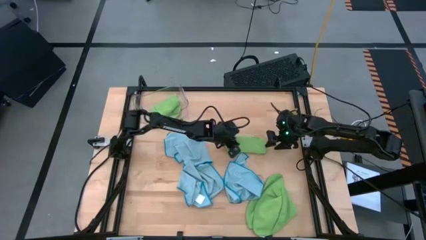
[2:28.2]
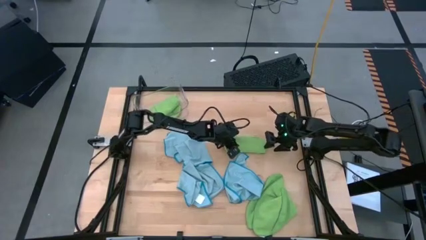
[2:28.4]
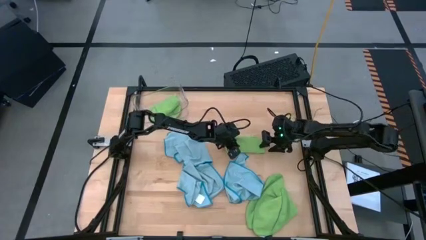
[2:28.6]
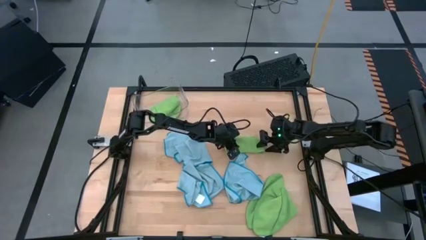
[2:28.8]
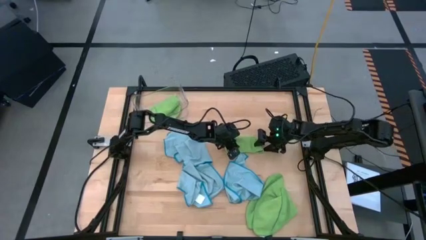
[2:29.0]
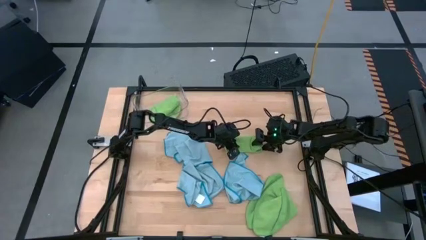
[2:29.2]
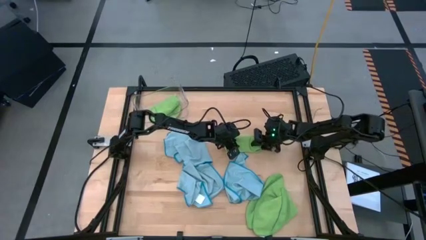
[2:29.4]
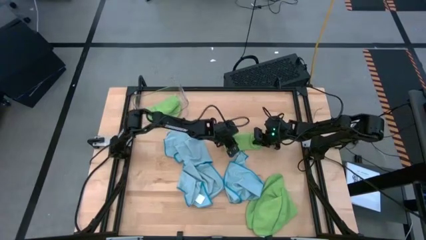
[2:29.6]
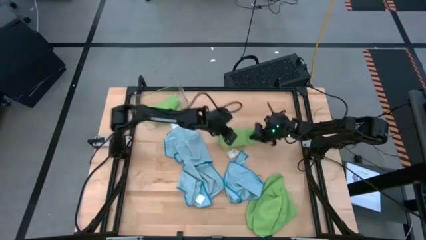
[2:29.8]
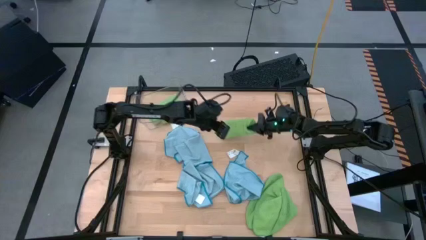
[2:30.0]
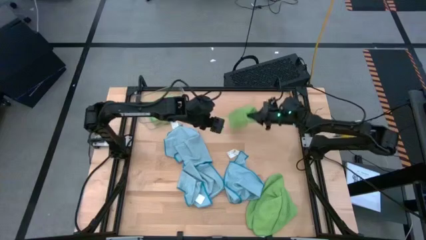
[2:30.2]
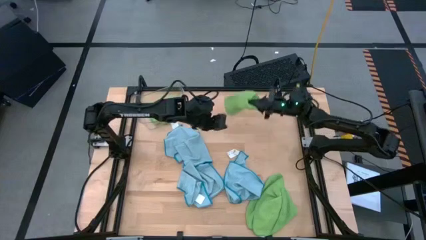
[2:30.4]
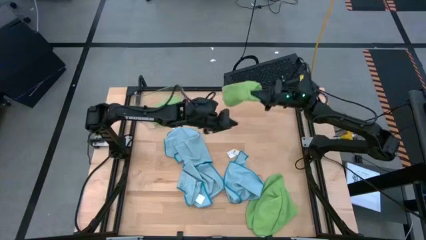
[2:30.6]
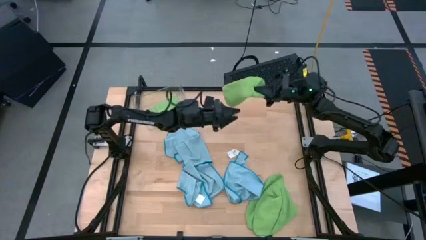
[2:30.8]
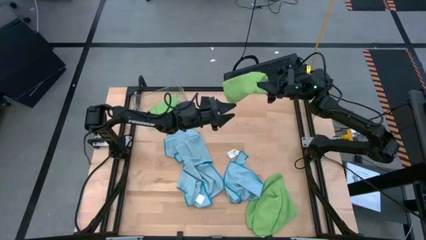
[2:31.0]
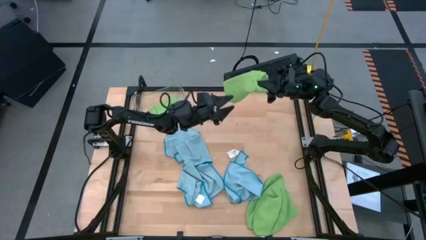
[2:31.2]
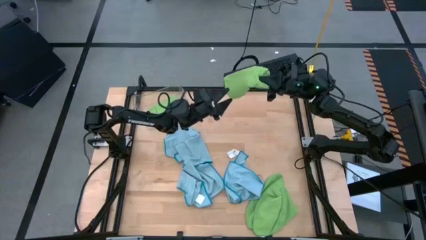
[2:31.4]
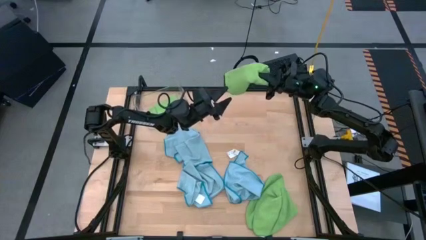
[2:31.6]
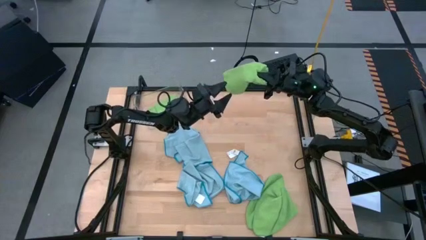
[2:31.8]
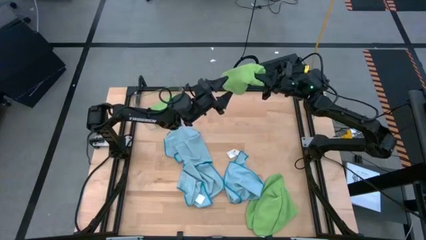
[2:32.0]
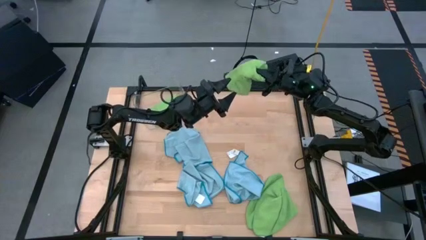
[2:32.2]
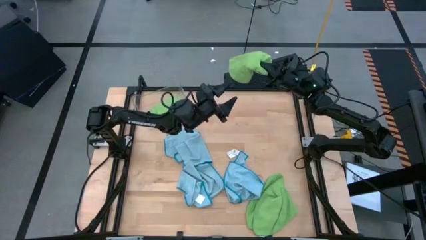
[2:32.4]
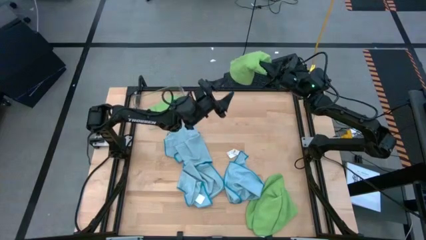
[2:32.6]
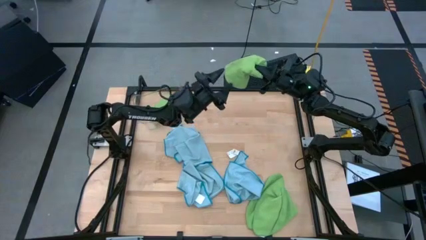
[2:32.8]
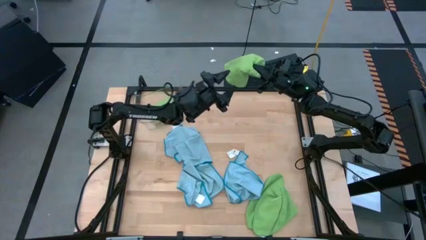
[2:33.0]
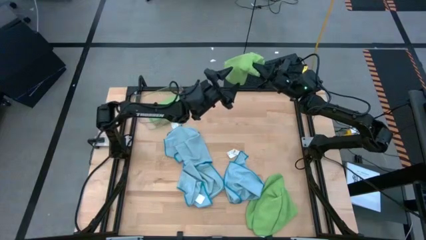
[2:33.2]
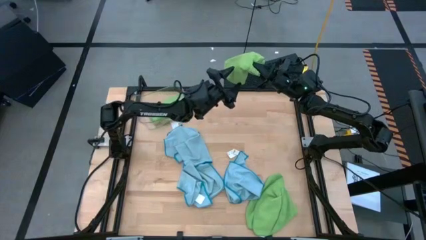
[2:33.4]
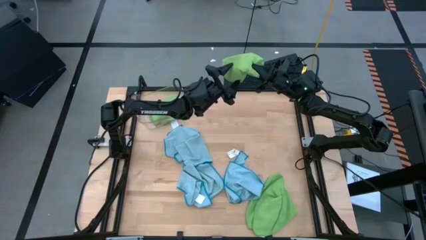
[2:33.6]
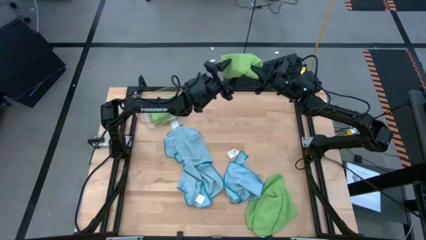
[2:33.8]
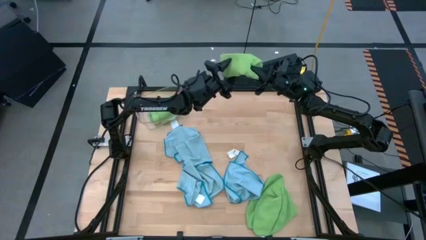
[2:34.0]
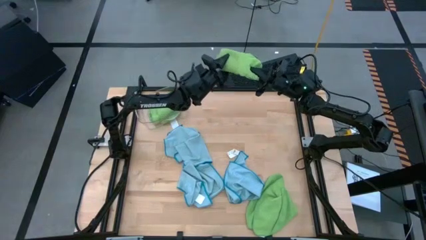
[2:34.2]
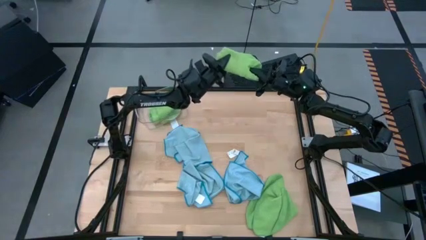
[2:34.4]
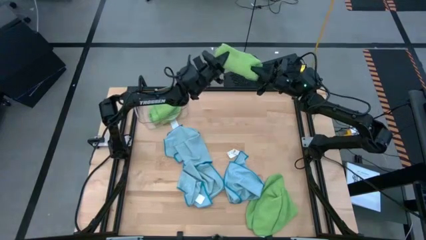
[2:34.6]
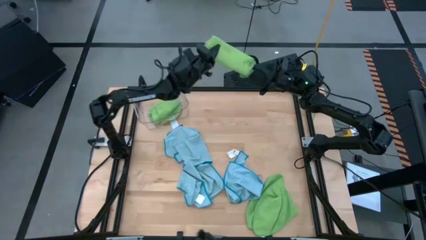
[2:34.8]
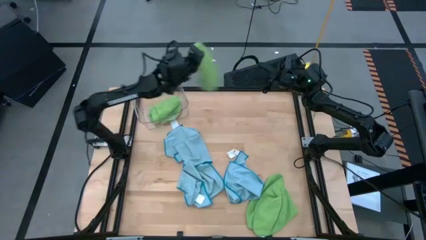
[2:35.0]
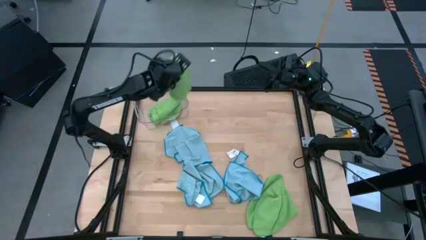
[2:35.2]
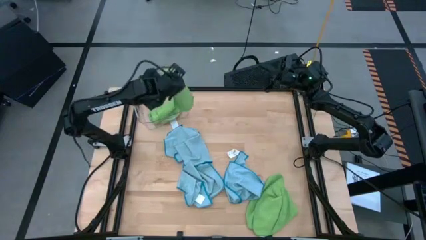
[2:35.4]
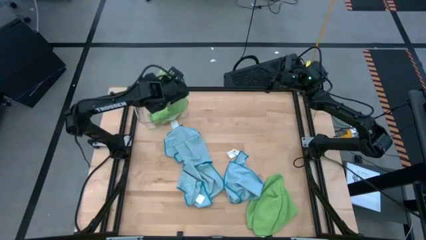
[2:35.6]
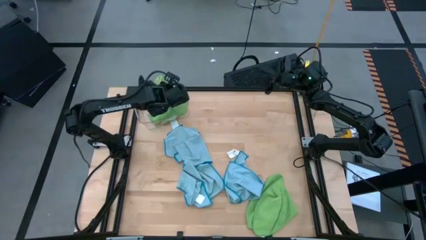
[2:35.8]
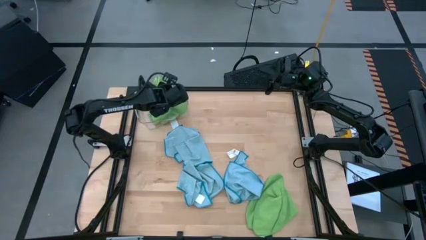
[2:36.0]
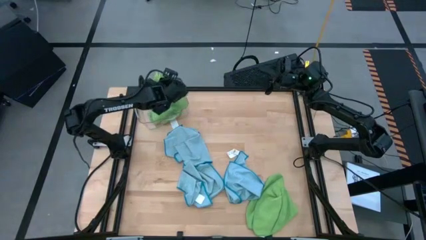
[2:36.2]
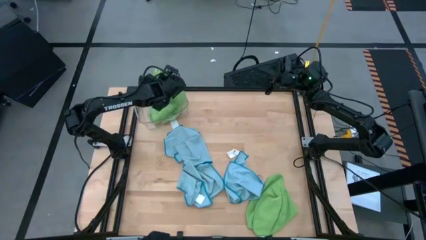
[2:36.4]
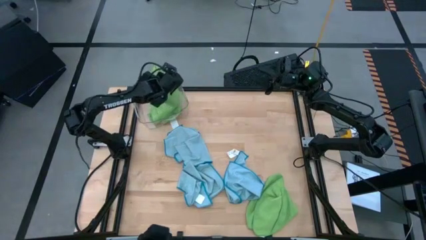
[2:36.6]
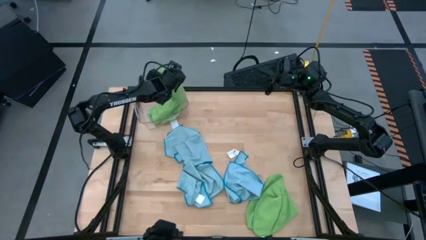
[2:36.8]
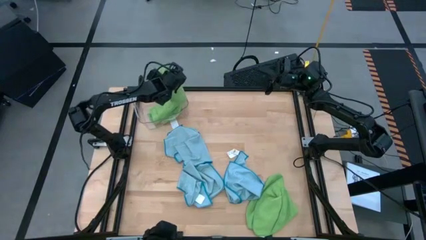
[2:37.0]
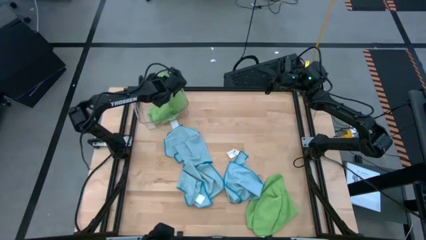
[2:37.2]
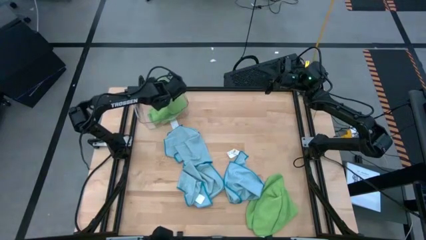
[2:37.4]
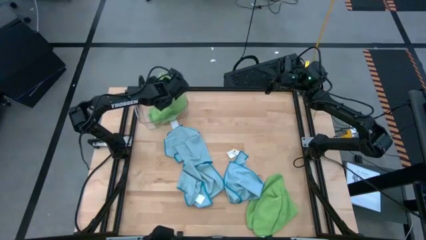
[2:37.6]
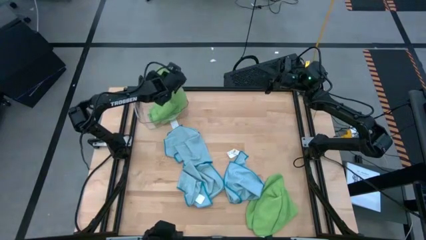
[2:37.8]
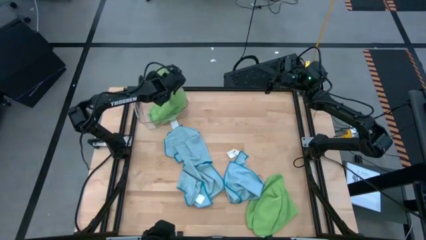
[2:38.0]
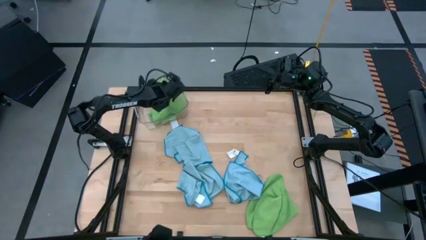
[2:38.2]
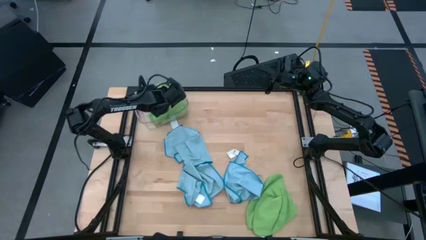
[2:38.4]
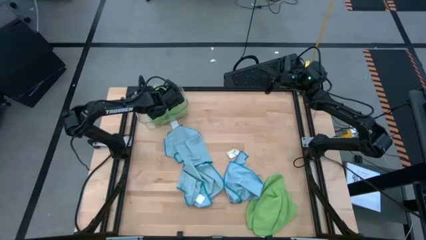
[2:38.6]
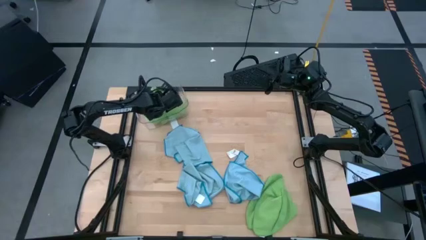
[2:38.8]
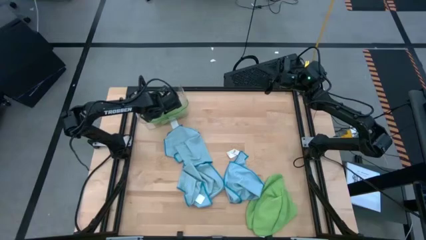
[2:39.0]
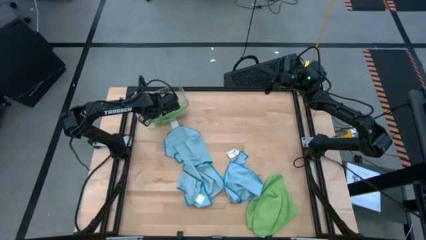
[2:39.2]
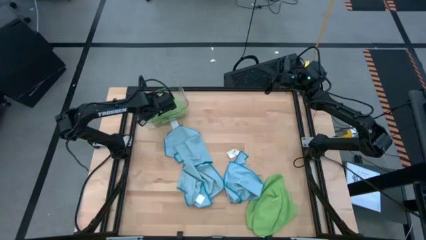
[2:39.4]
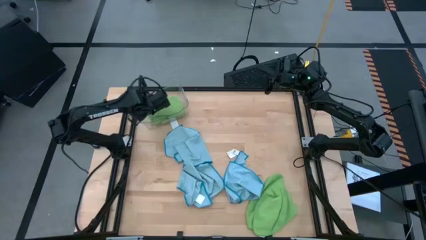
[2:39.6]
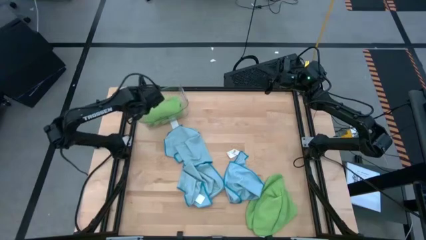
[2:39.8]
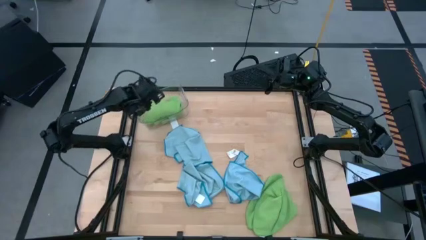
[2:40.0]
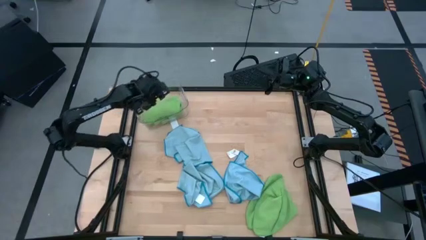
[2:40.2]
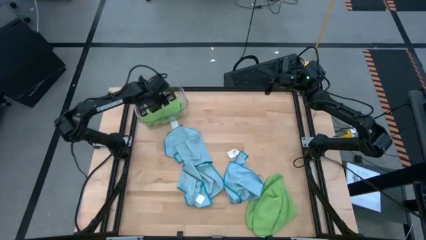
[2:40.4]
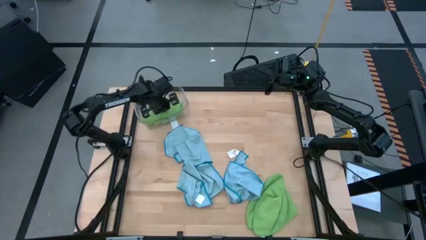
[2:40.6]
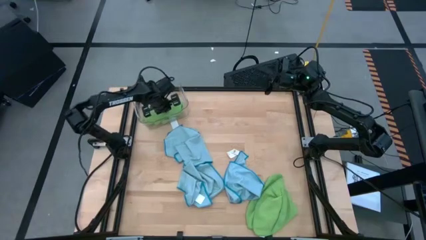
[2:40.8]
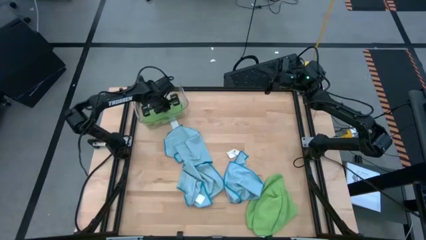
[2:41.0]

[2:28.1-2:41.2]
Task: Fold microfiber towels
Stack the folded green microfiber cloth on top of the green microfiber cloth on the transparent bin

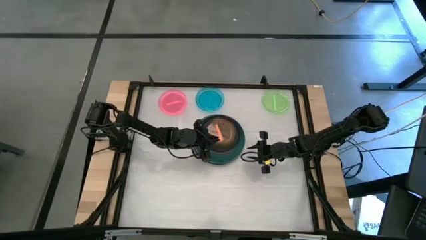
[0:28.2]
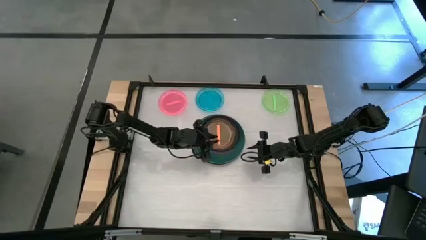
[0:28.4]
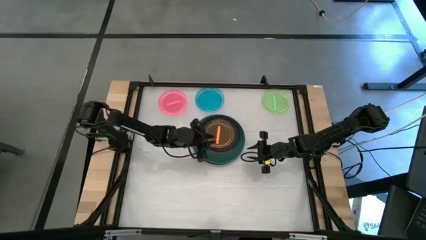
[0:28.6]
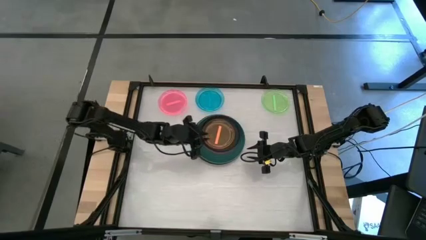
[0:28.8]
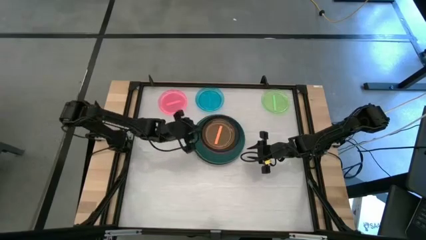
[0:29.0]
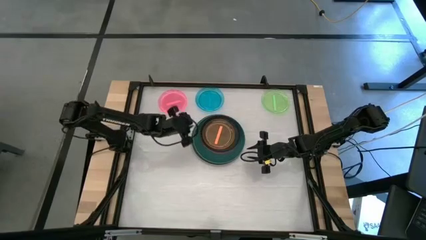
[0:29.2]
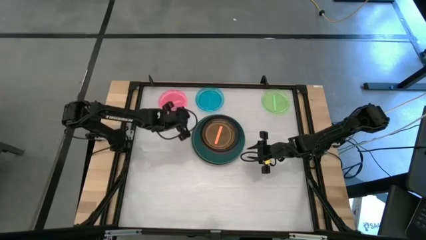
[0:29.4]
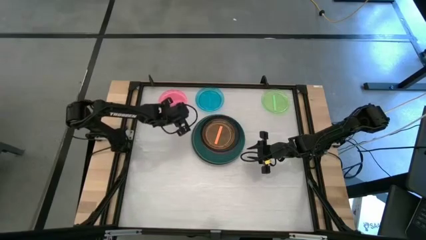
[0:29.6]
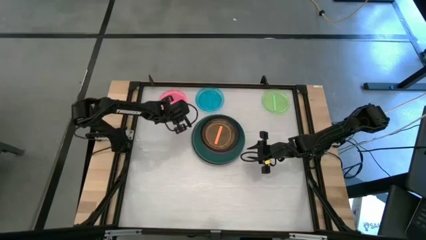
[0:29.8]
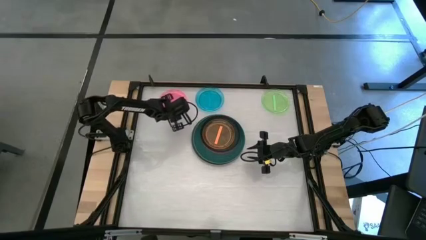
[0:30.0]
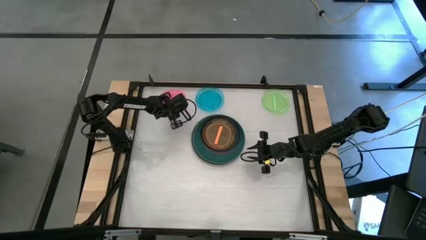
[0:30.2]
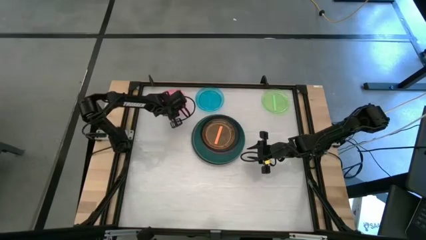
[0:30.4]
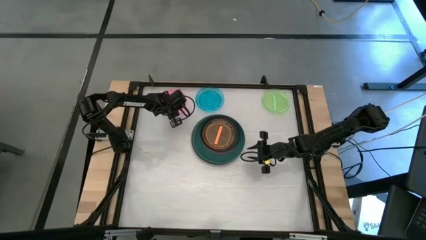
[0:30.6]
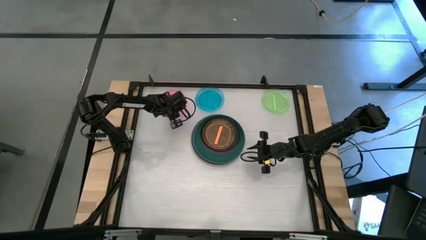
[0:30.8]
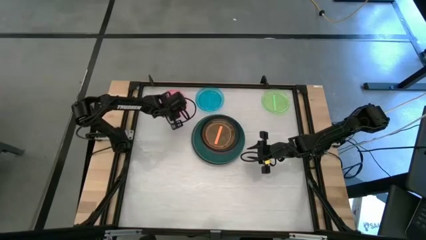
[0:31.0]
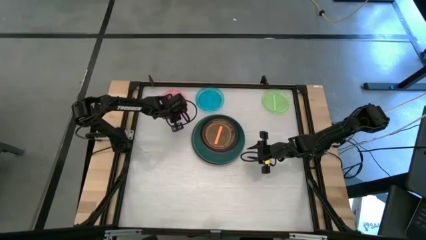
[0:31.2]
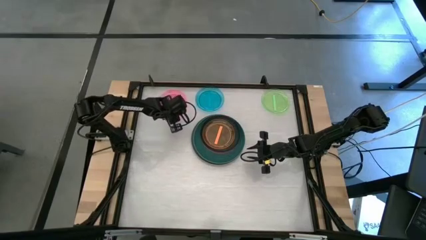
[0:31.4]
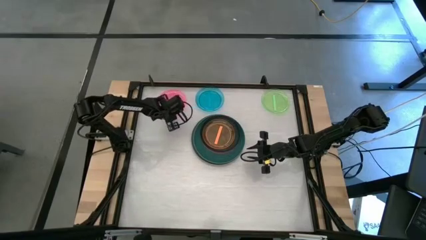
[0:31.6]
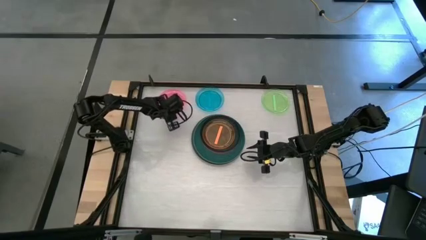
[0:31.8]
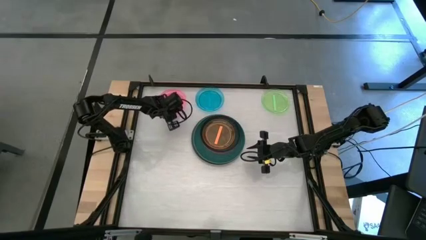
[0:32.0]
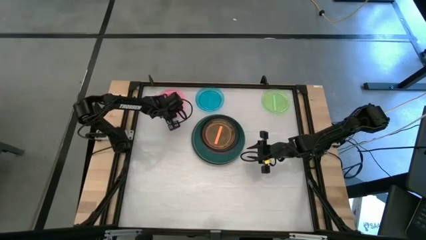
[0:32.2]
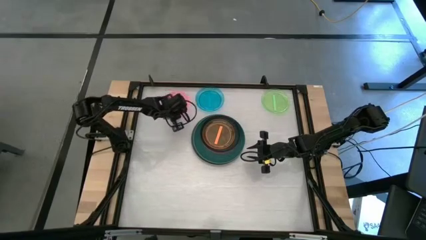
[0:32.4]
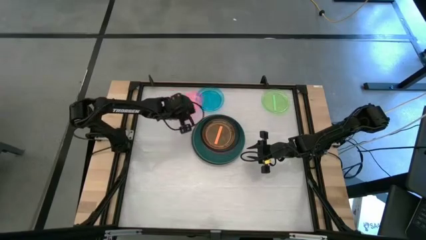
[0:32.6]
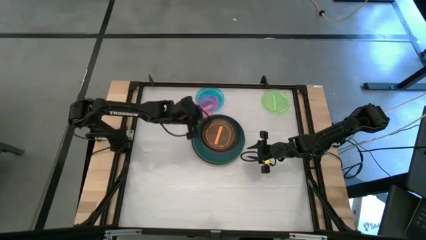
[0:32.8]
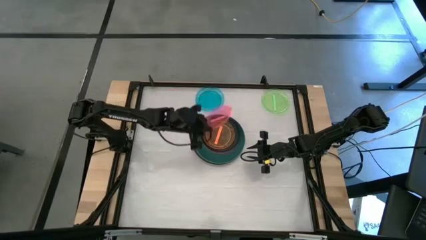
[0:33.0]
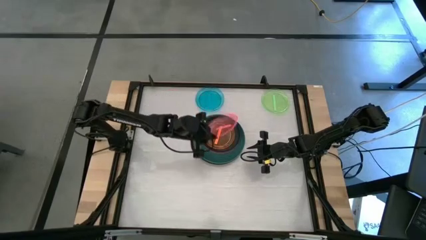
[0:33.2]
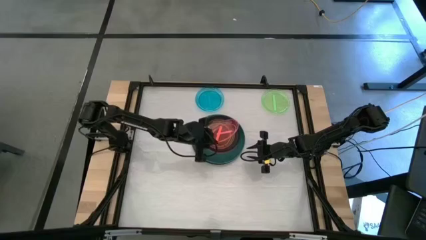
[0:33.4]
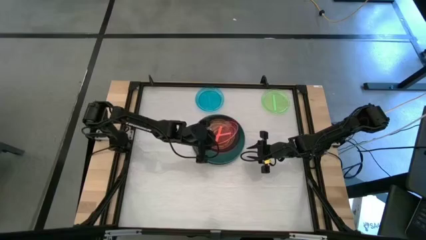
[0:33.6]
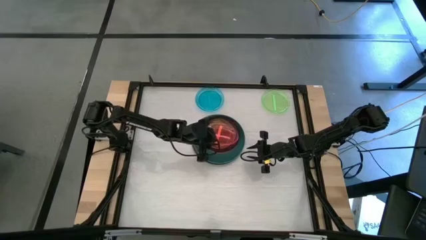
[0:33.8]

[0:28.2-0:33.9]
Task: Stack plastic plates
Stack the transparent pink plate on top of the transparent orange plate
